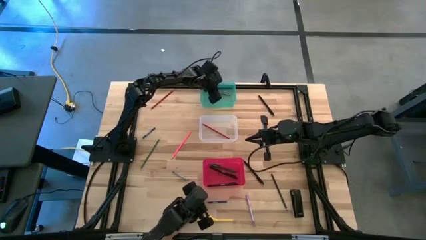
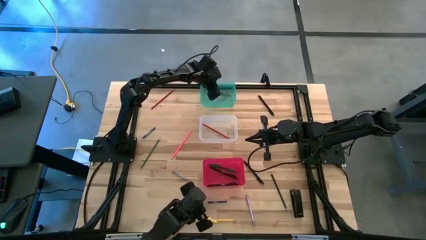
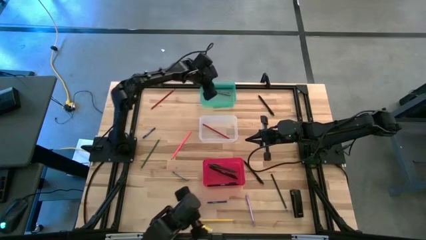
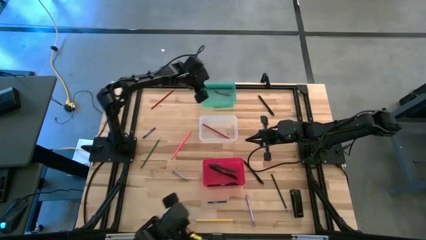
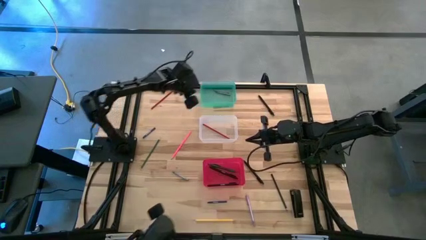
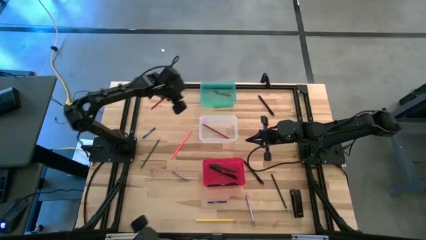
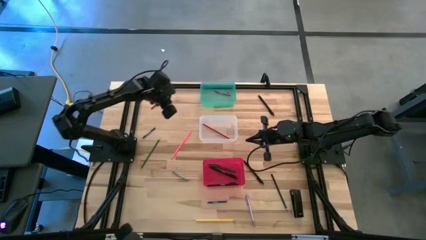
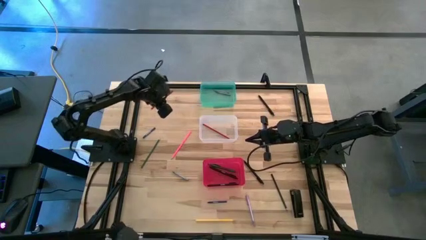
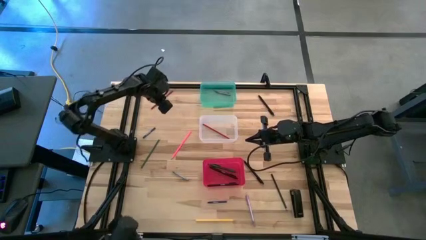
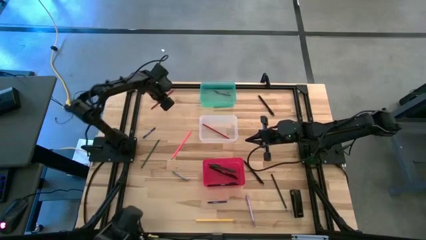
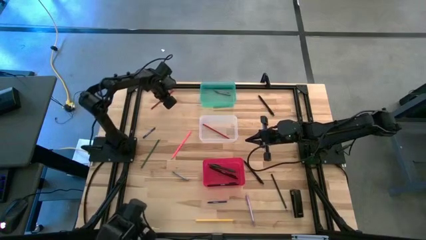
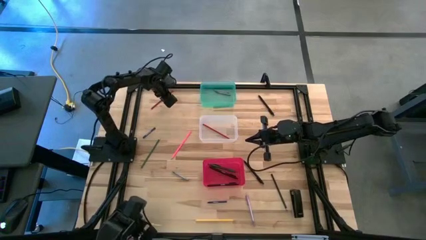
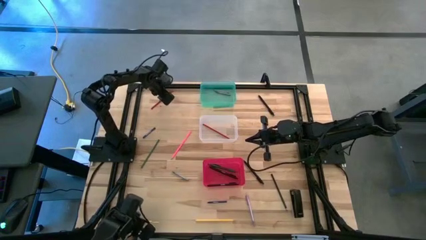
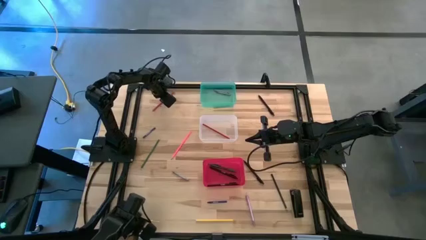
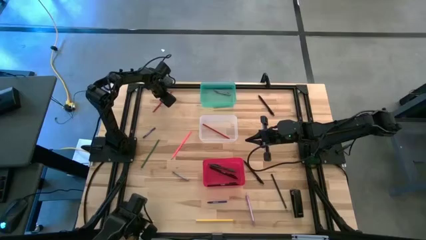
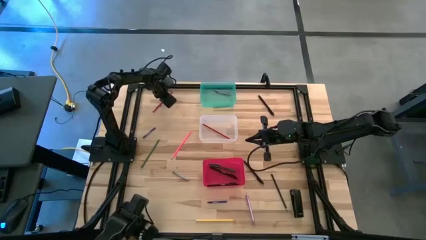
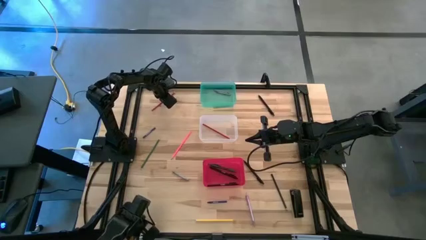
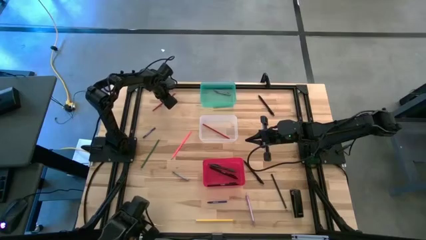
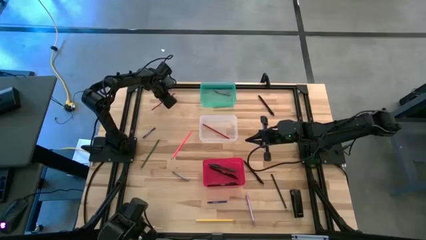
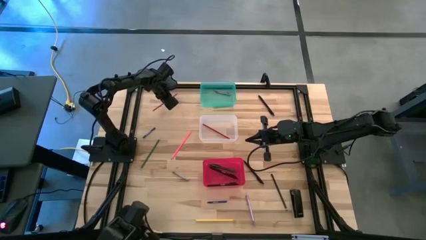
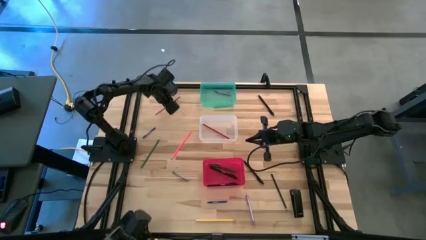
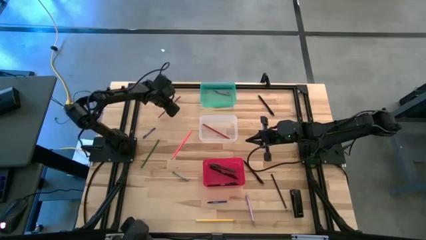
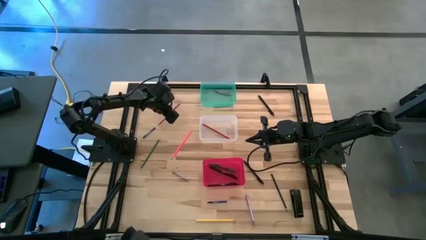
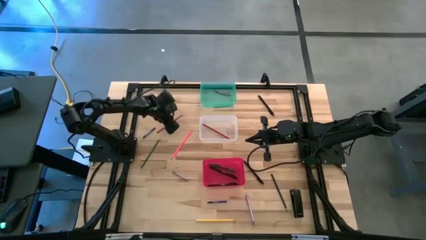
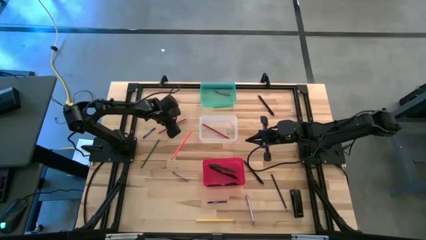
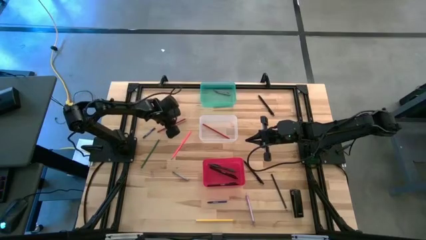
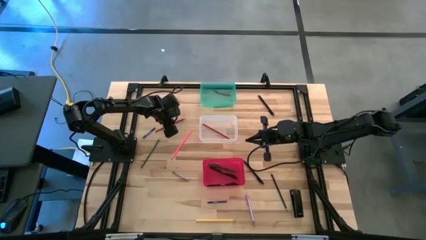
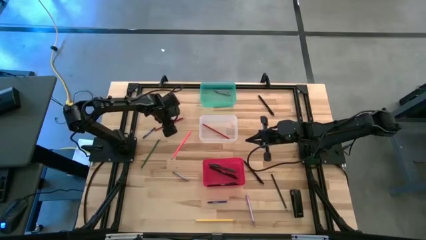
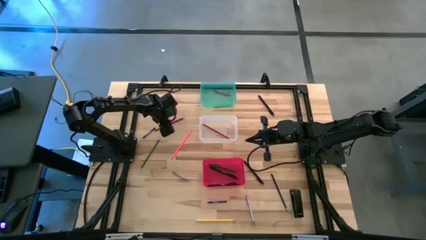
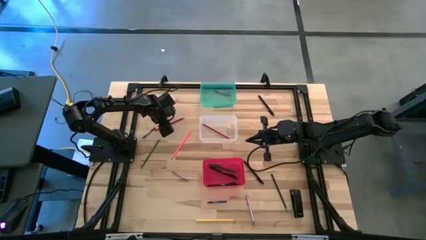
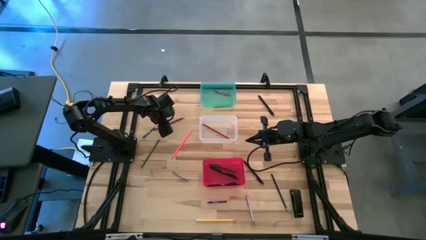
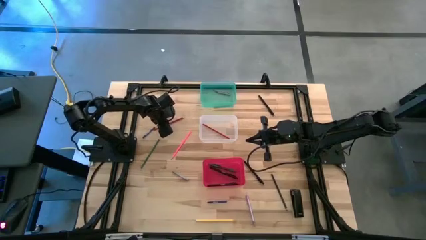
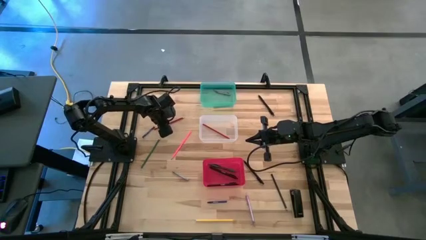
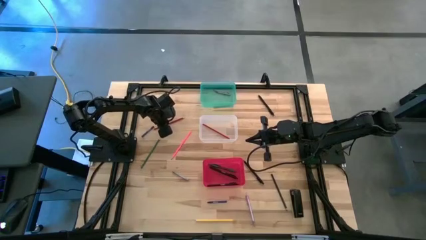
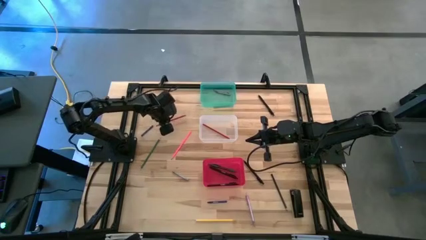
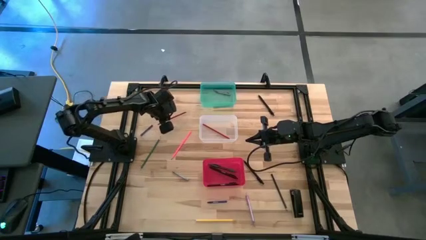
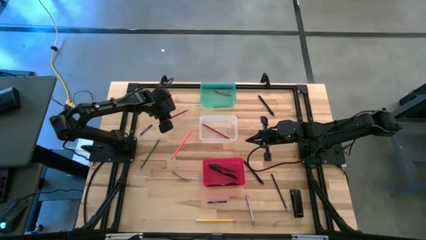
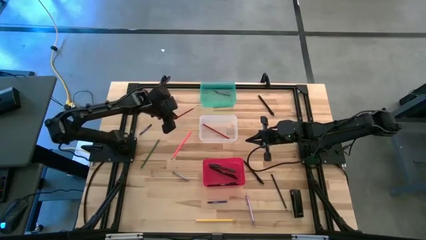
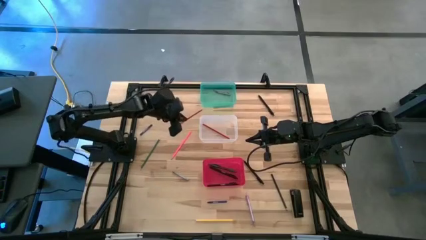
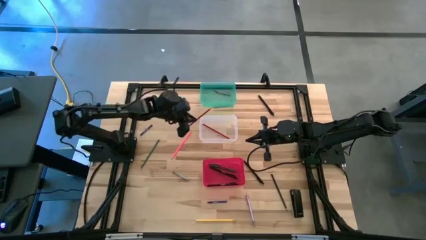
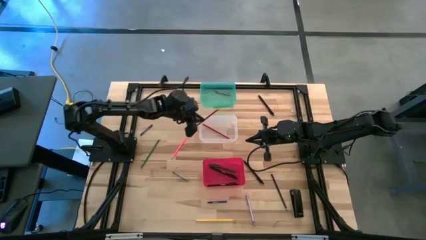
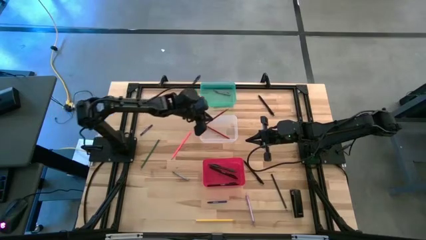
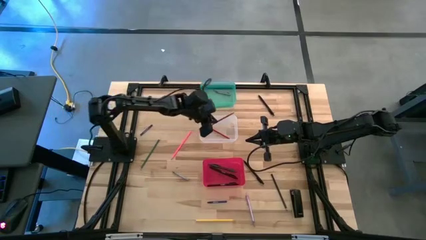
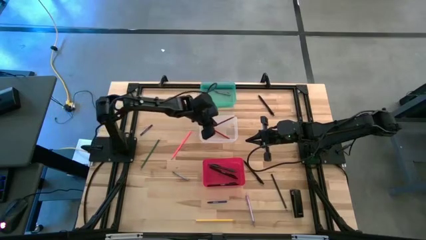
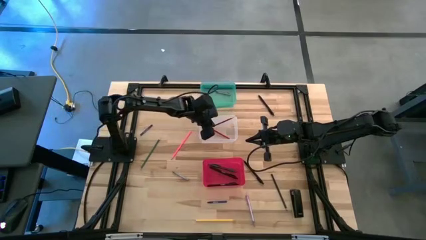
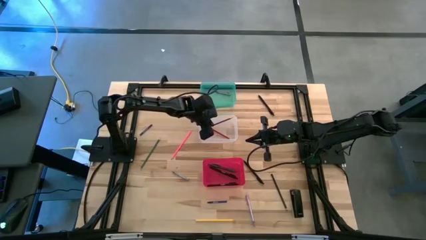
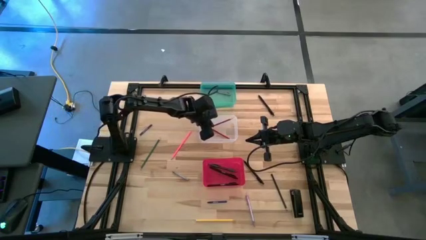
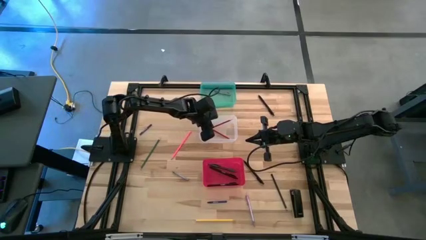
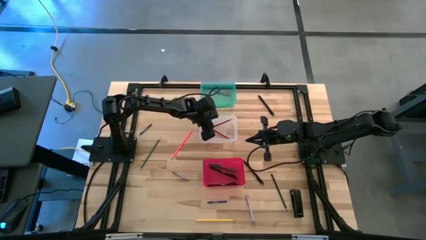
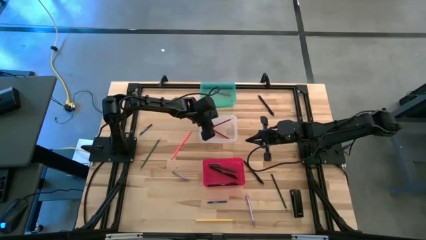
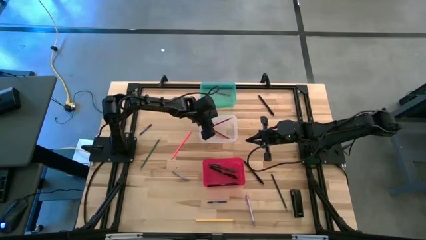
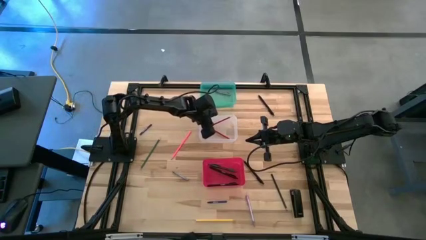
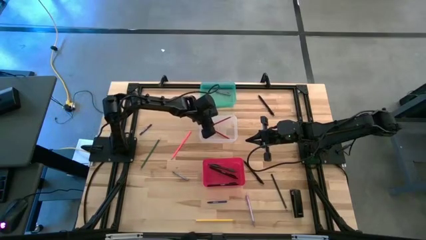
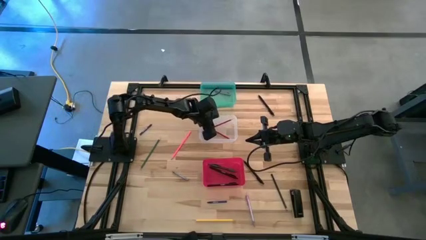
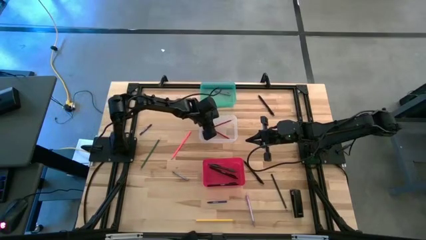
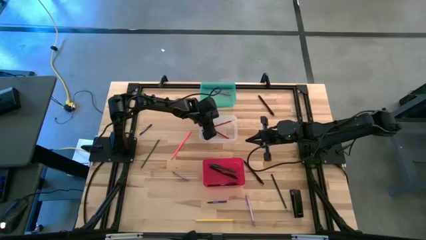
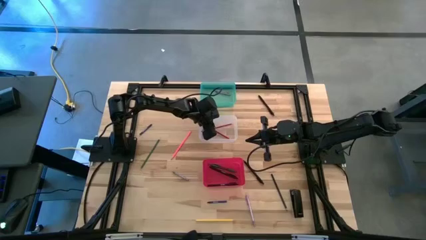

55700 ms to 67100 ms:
Task: Sort crayons/erasers/pens/pencils in bins
Put the red pencil into the transparent bin
